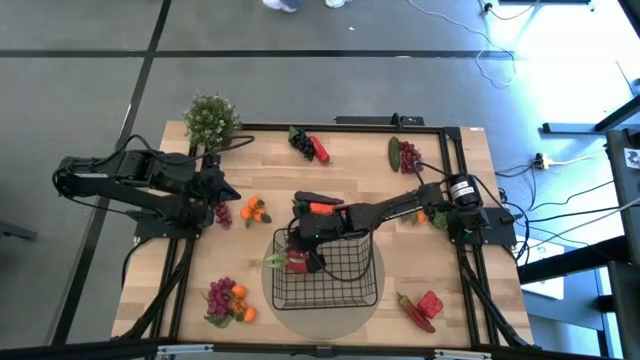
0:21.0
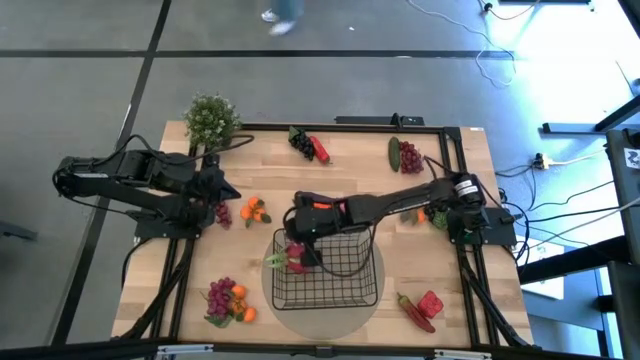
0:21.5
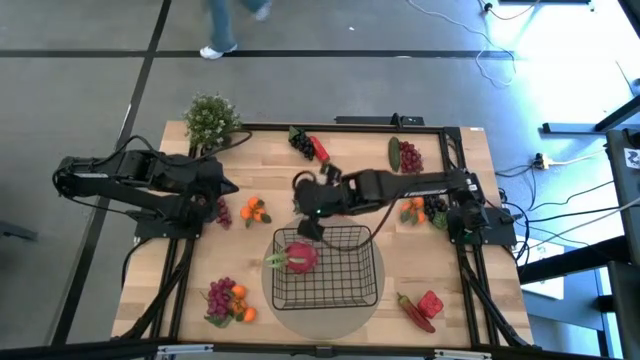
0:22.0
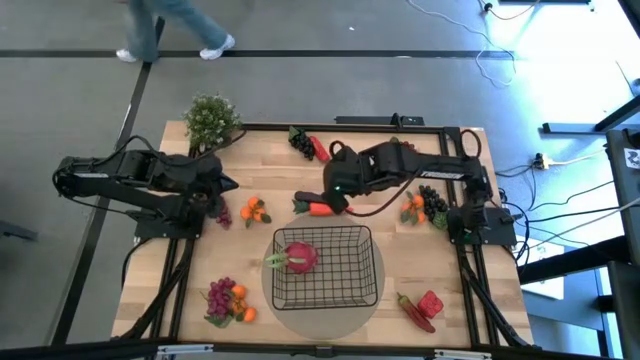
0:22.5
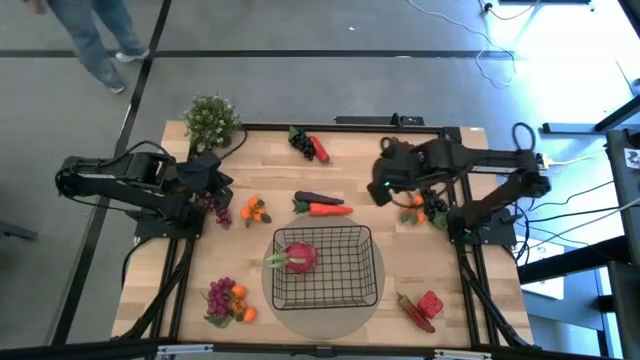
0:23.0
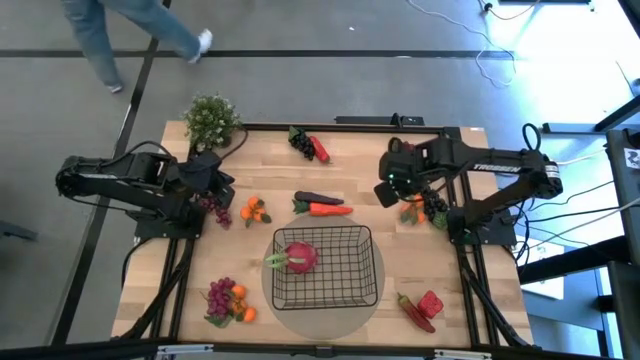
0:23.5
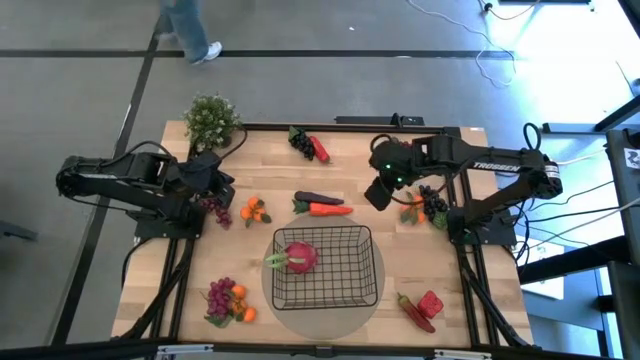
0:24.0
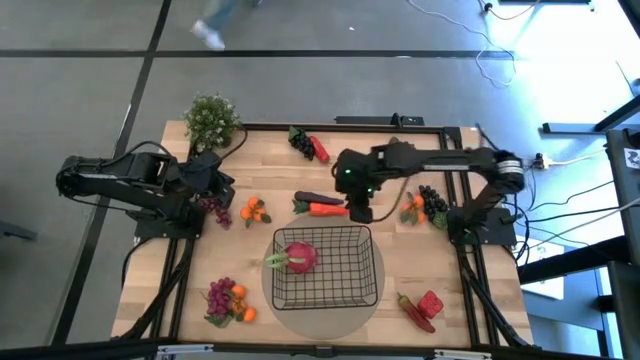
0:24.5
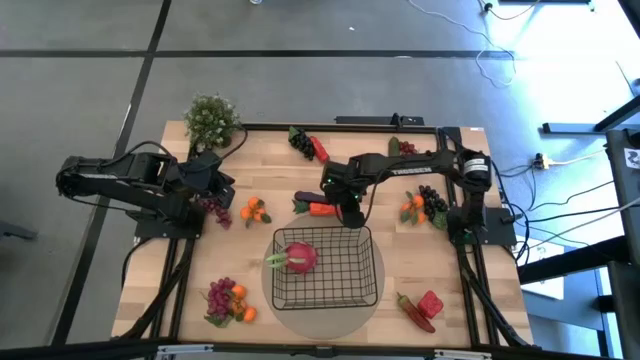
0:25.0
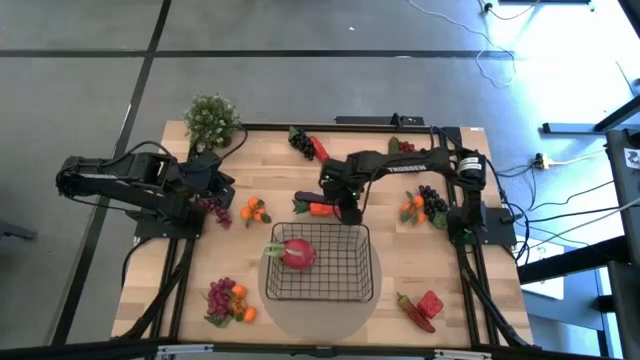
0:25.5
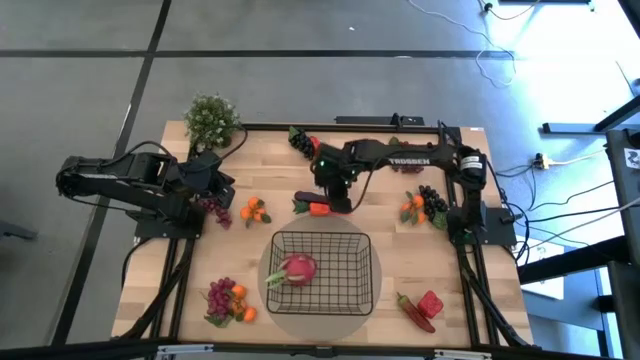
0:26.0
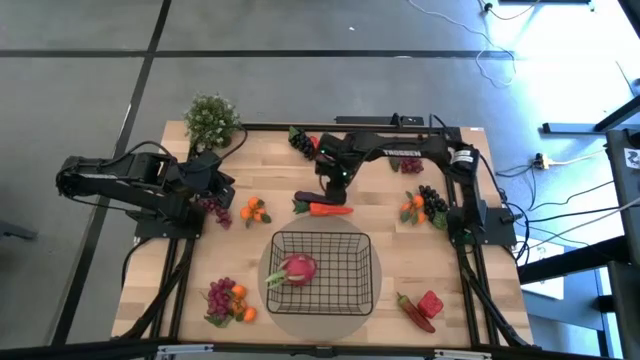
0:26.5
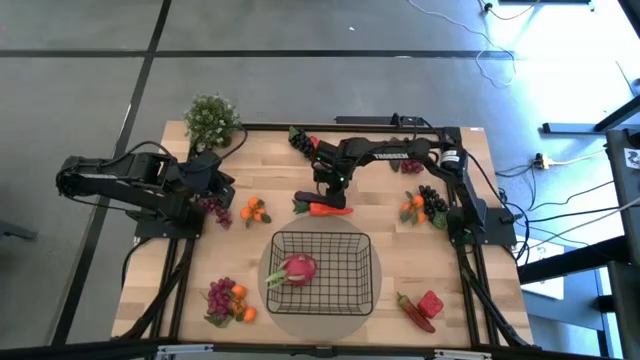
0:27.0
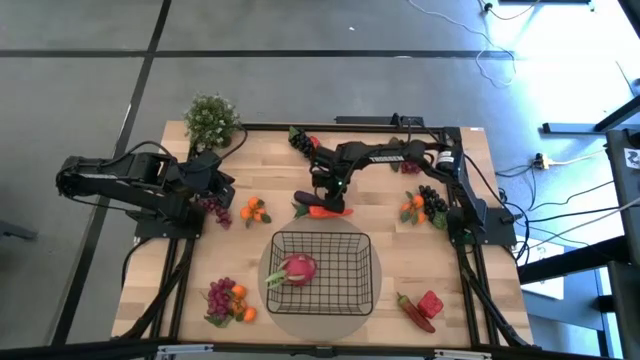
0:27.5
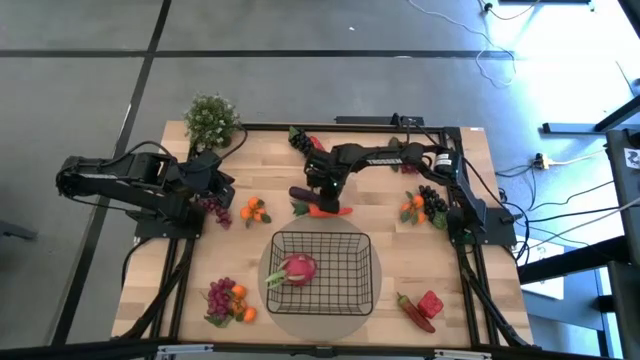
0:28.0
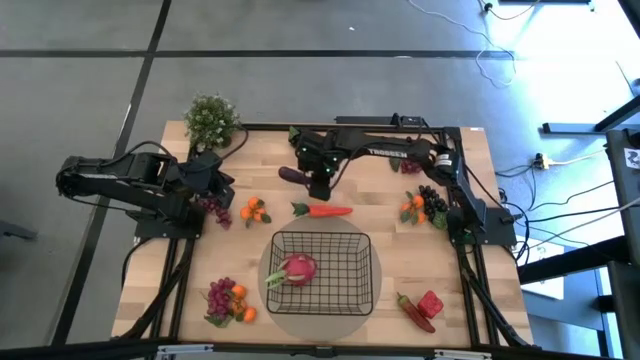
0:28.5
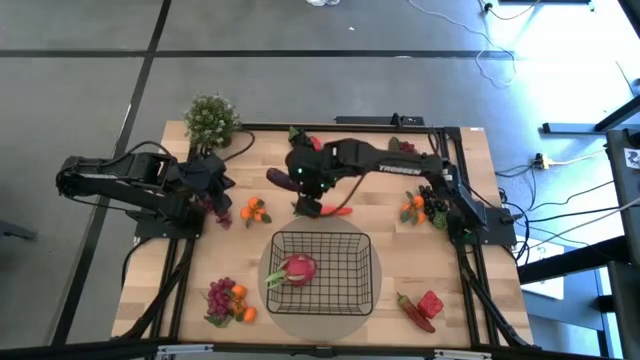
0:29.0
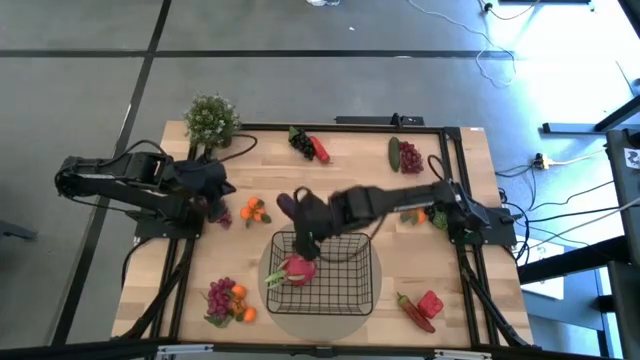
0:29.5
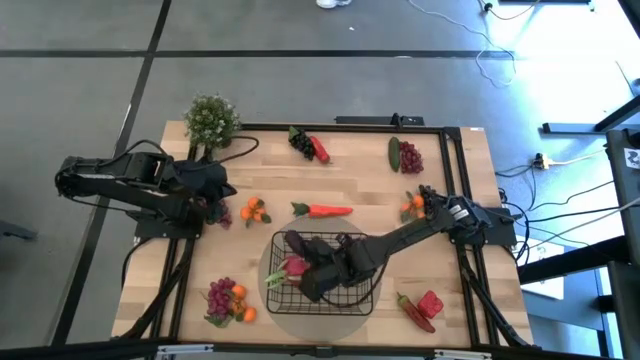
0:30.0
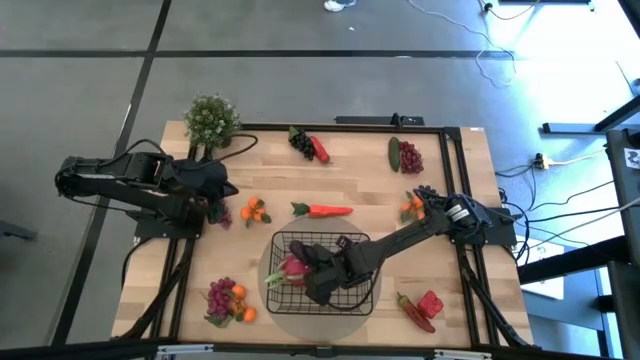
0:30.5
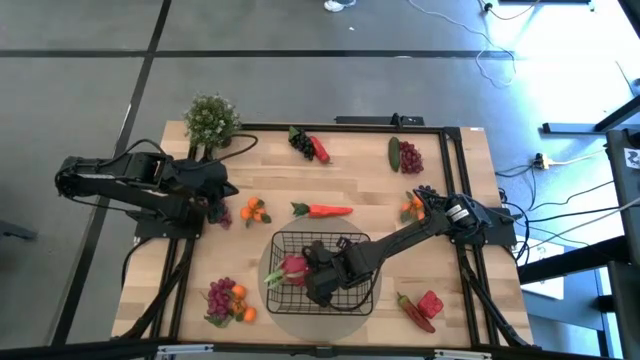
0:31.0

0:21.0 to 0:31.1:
Task: Build produce basket
Put the eggplant into the black wire basket

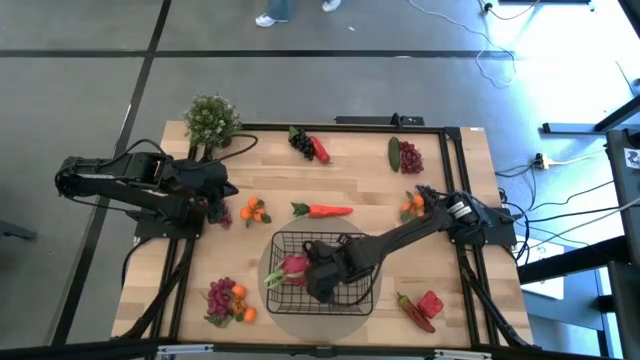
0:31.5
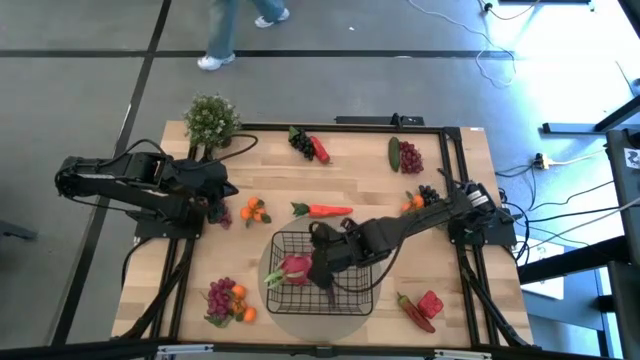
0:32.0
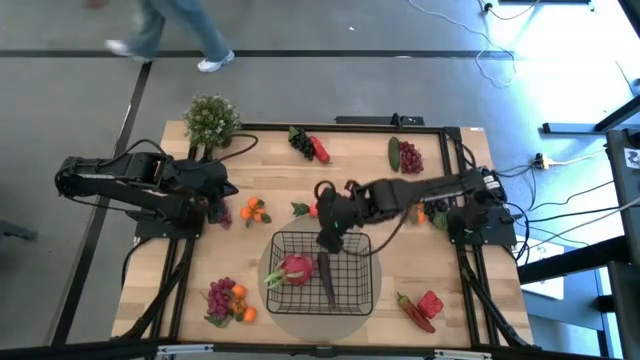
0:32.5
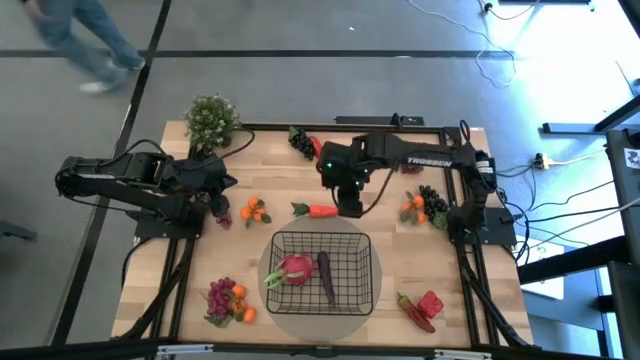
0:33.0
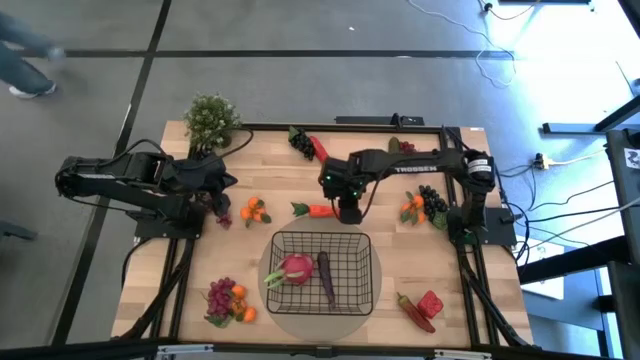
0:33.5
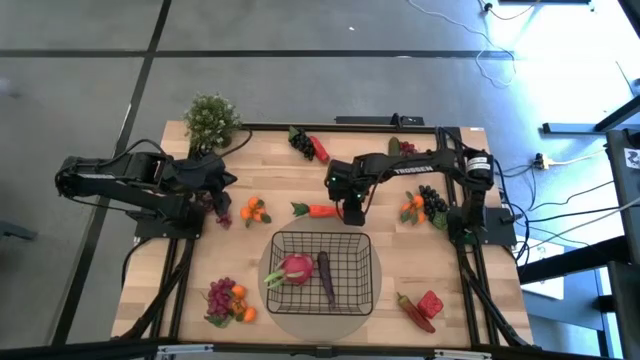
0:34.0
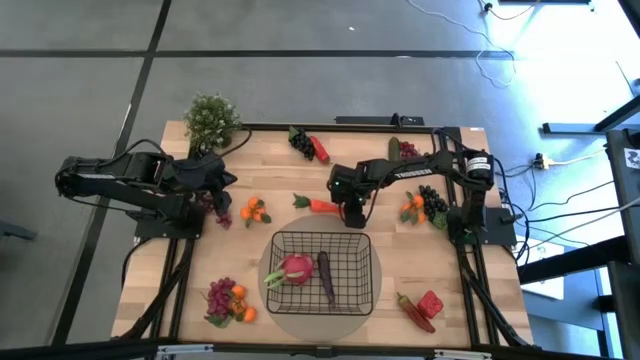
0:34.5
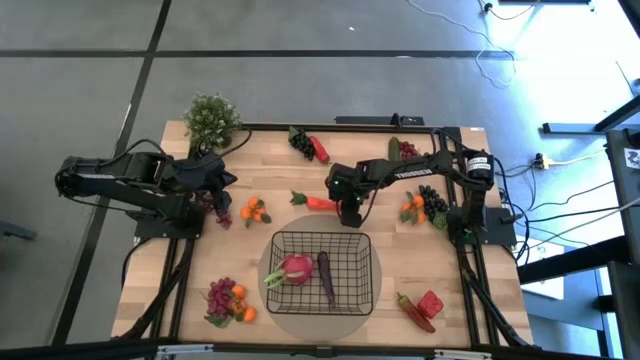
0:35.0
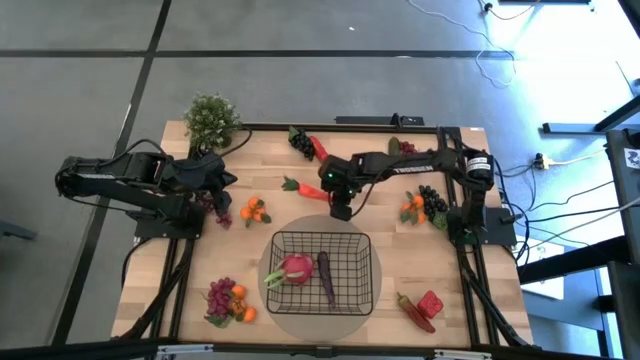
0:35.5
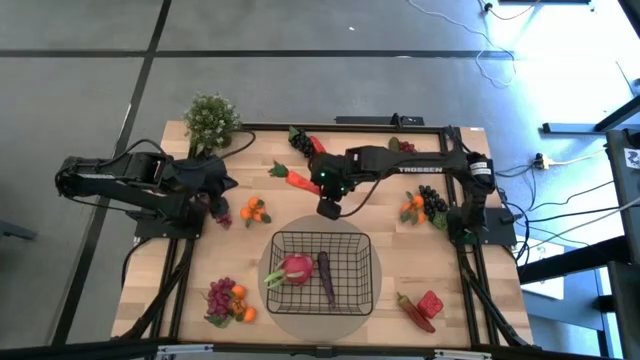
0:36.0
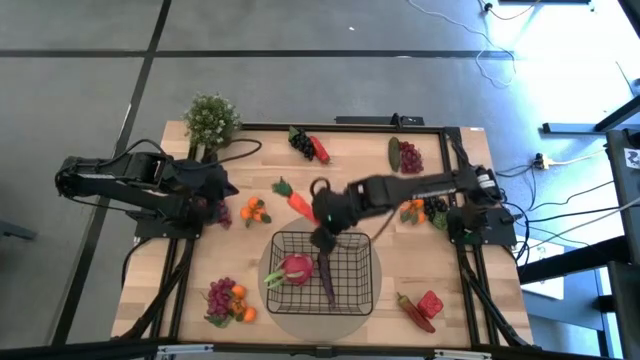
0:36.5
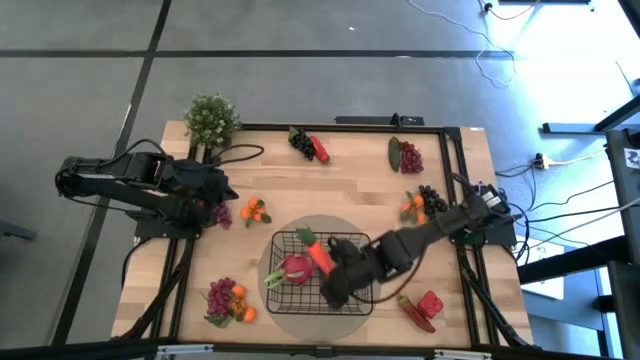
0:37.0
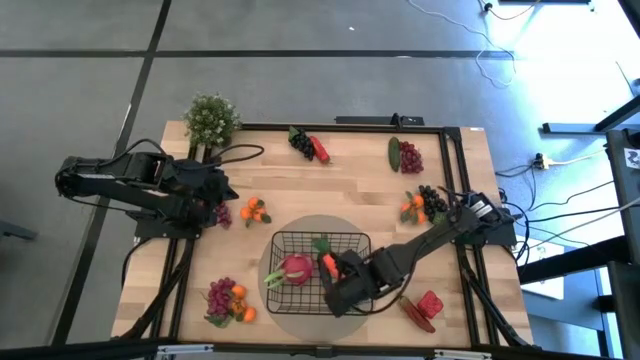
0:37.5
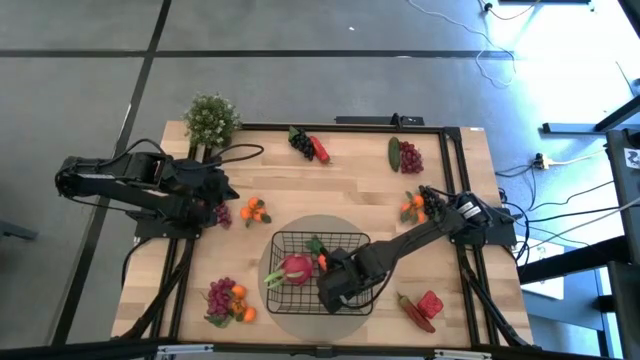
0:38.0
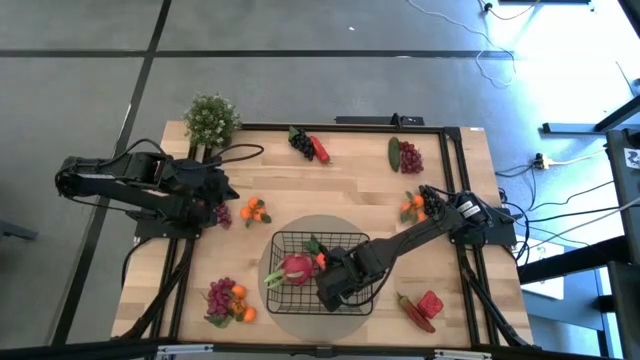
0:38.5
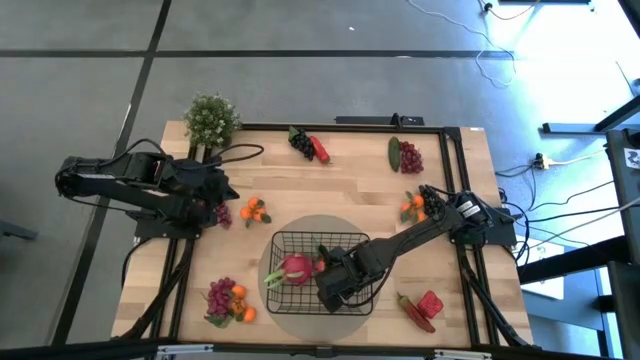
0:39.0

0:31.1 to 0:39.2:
Put the carrot into the black wire basket

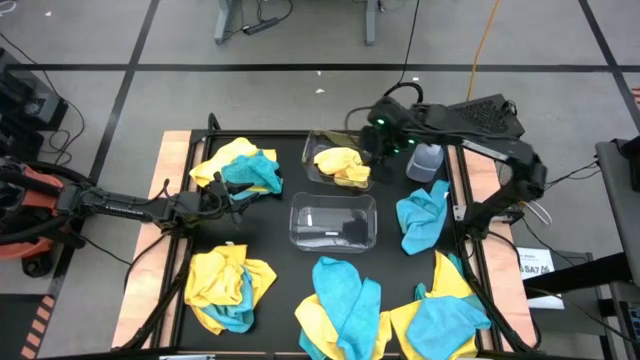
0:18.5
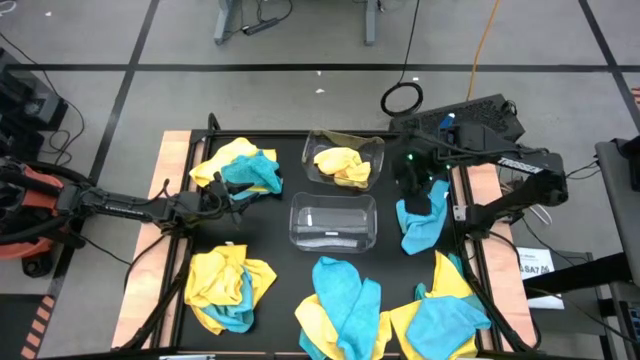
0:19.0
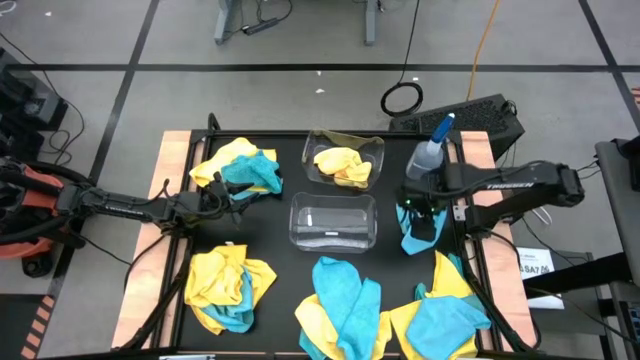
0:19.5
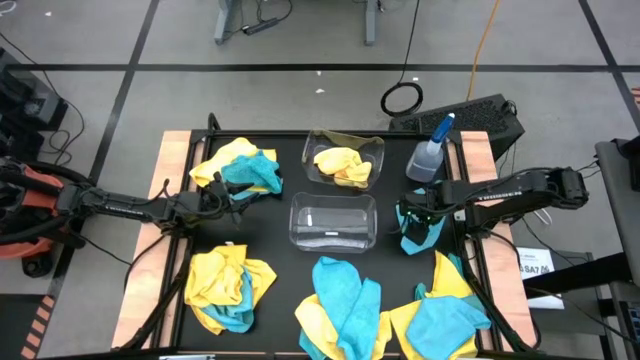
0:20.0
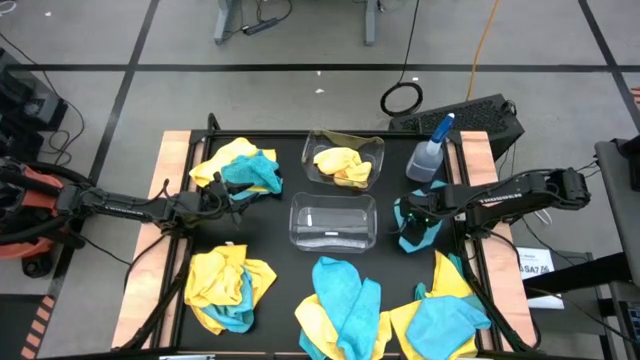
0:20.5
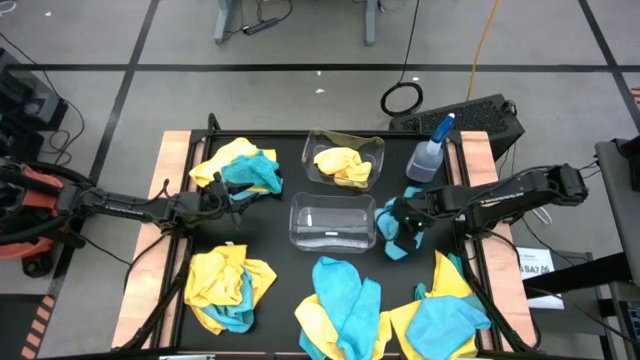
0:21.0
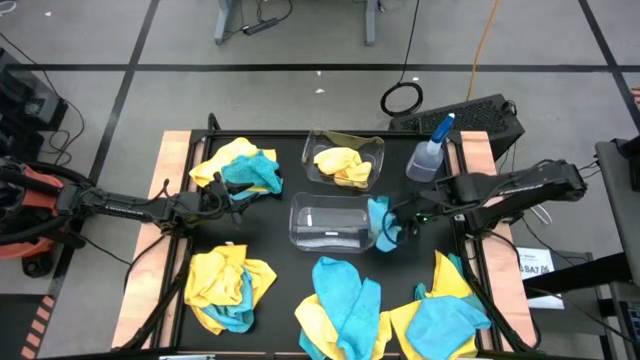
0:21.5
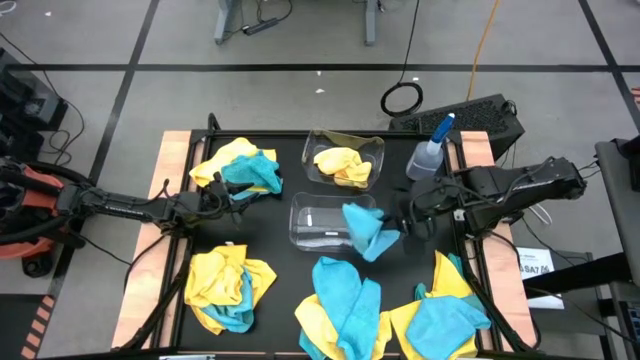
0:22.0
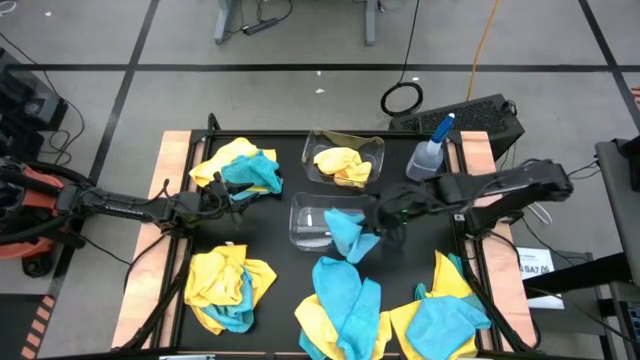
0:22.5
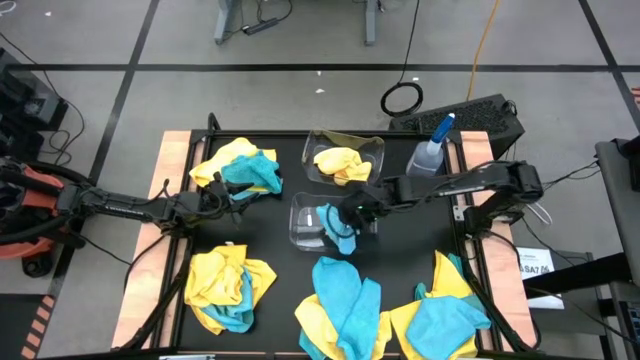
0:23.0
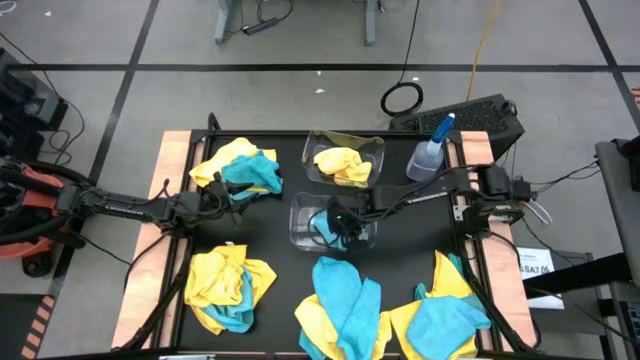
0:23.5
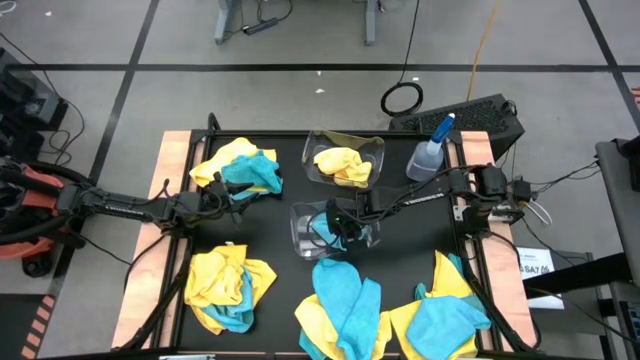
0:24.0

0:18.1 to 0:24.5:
Task: Sort microfiber towel by color & place in baskets
Put the blue microfiber cloth into the bottom transparent bin
